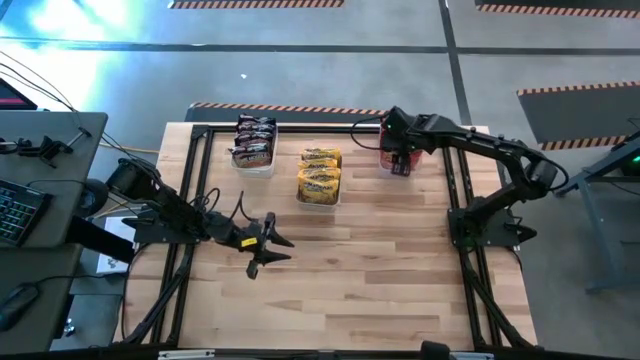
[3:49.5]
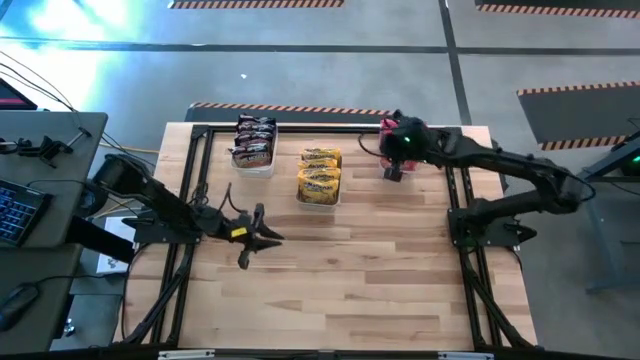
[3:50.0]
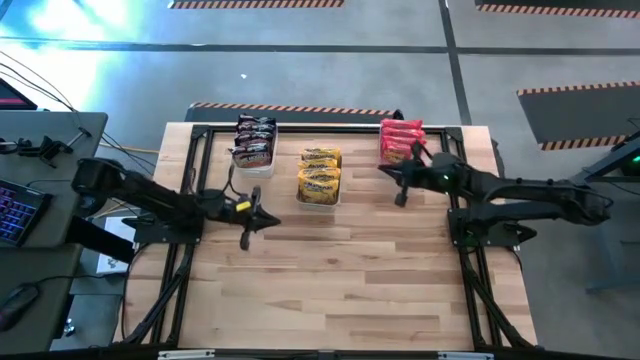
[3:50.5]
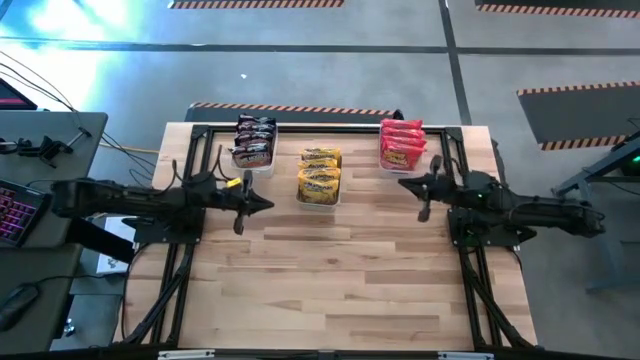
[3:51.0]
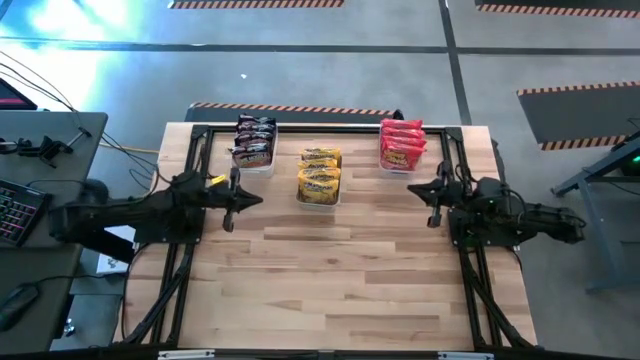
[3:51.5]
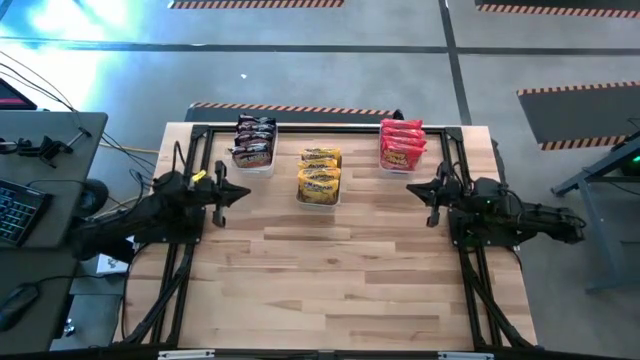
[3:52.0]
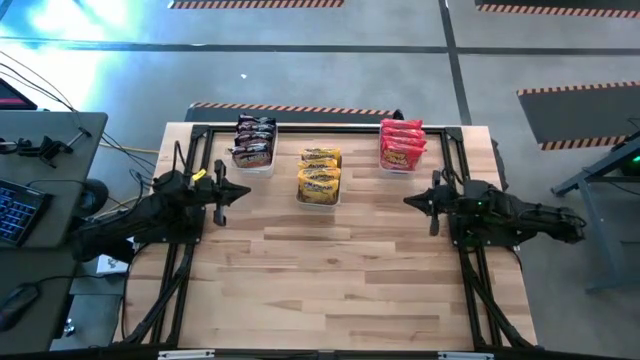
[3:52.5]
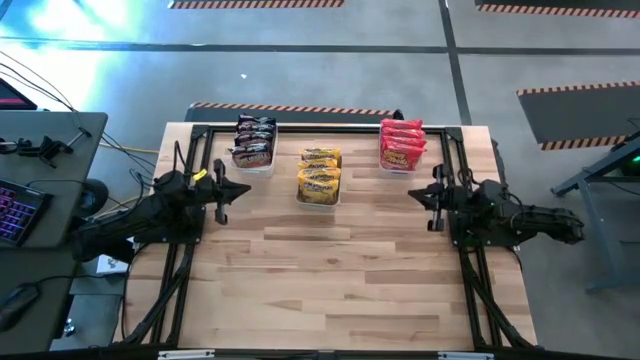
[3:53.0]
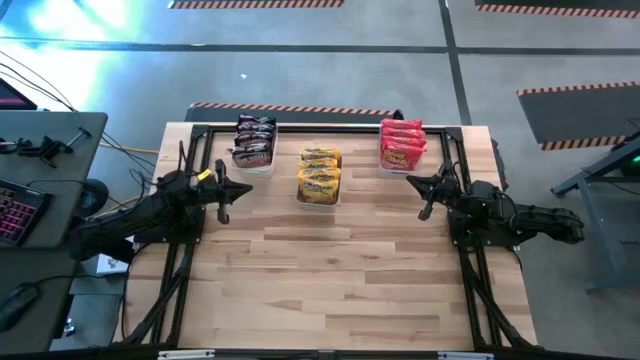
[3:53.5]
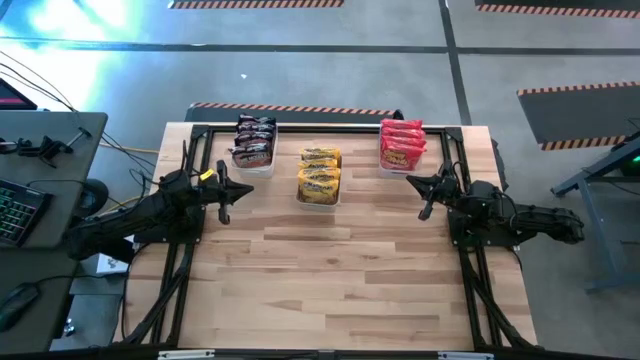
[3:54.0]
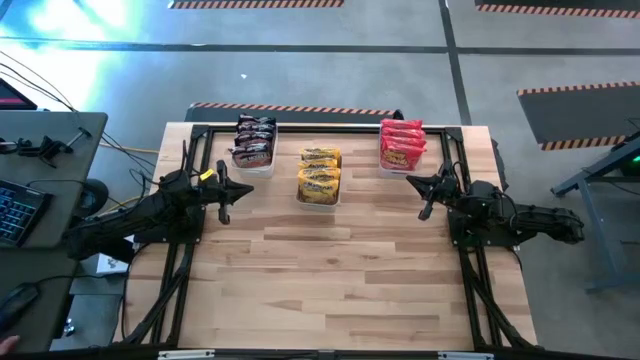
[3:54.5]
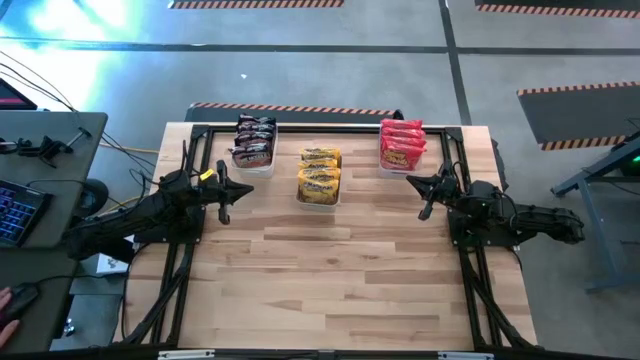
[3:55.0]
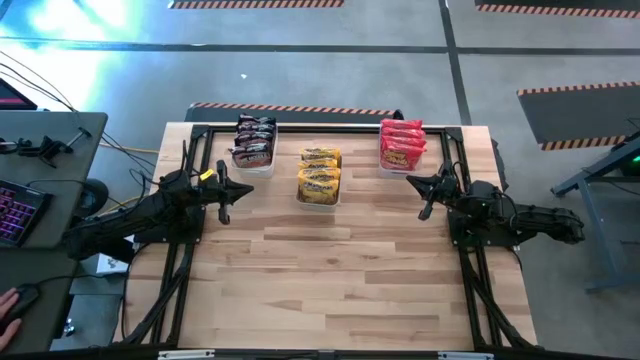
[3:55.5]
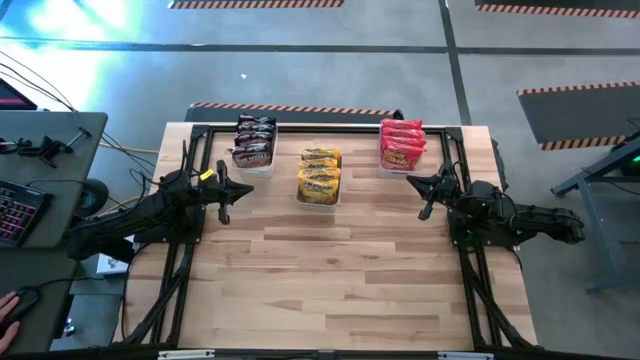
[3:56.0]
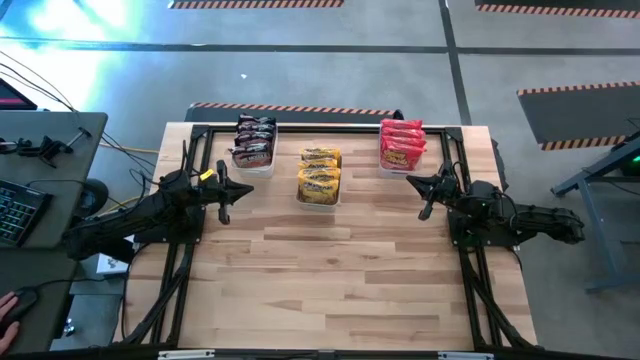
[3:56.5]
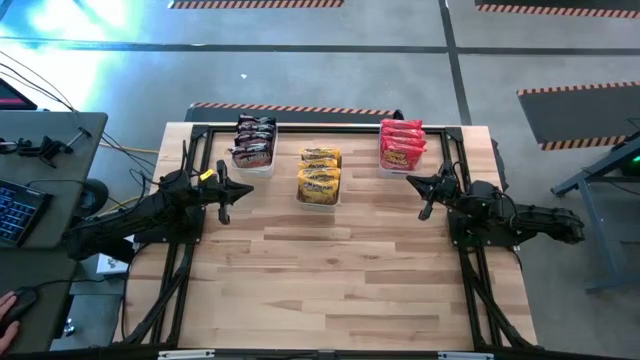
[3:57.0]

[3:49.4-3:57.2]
Task: Sort Maruchan noodles
Return to Home Position

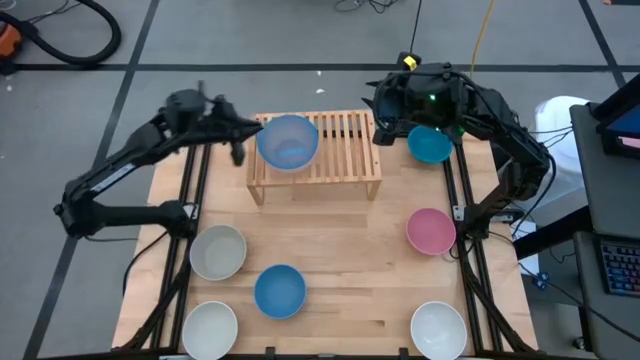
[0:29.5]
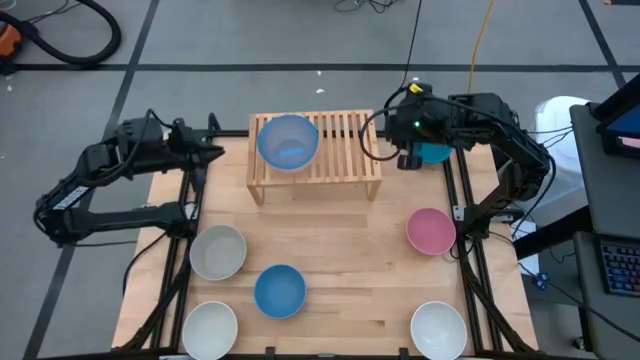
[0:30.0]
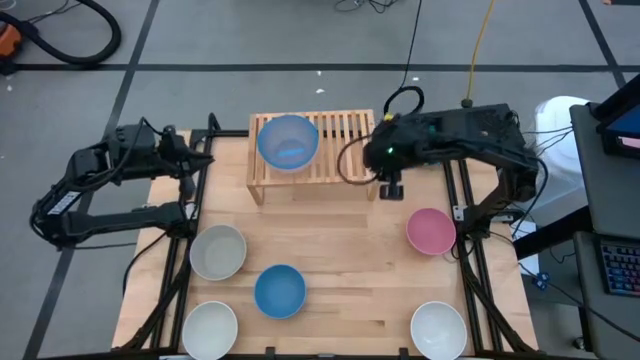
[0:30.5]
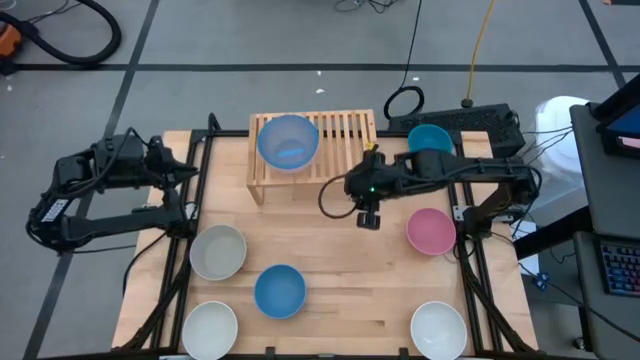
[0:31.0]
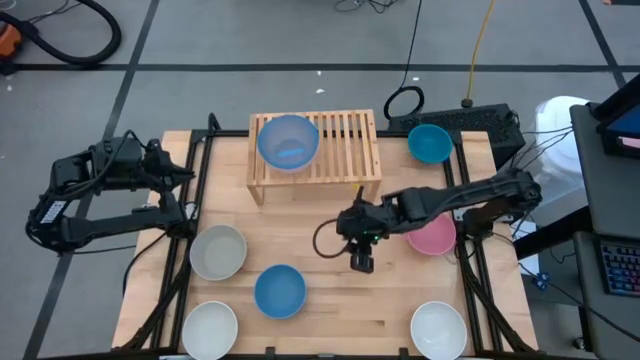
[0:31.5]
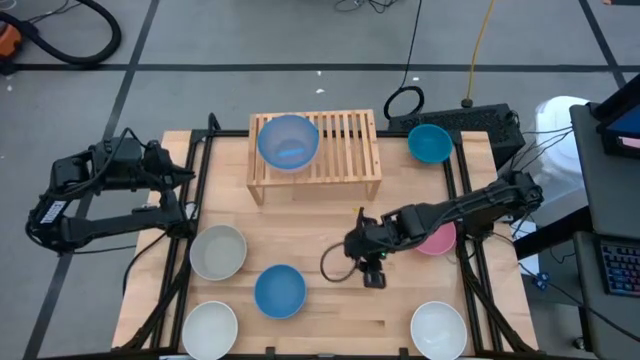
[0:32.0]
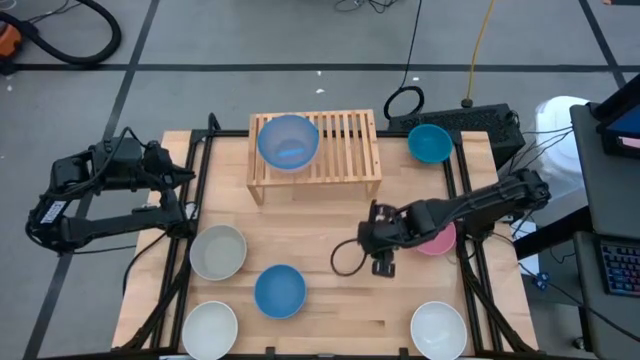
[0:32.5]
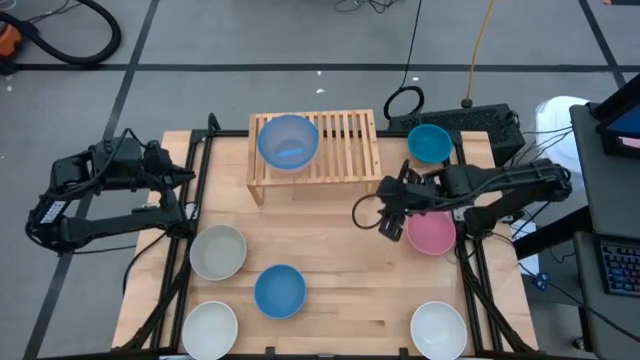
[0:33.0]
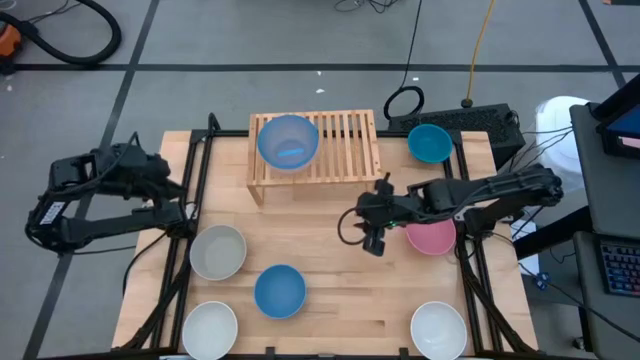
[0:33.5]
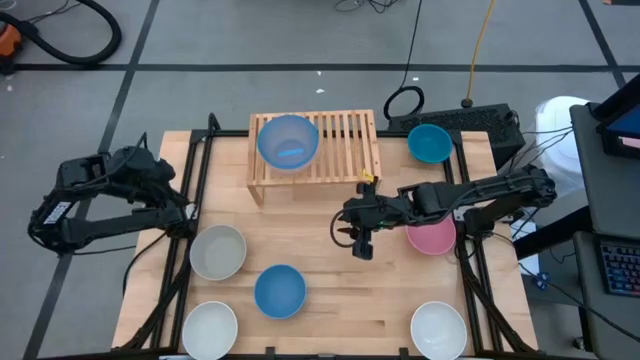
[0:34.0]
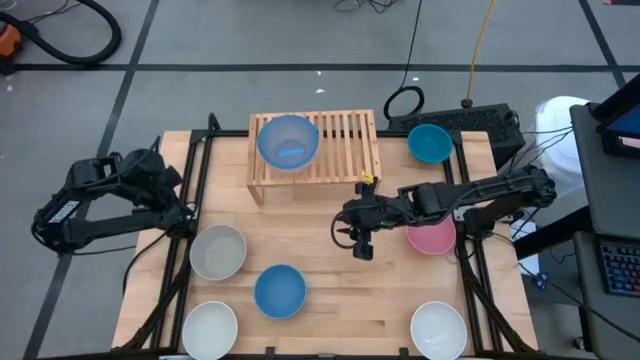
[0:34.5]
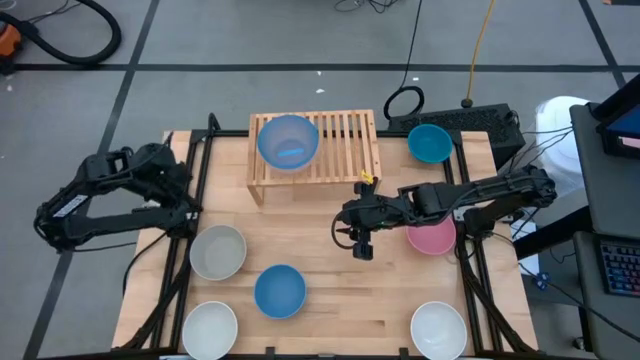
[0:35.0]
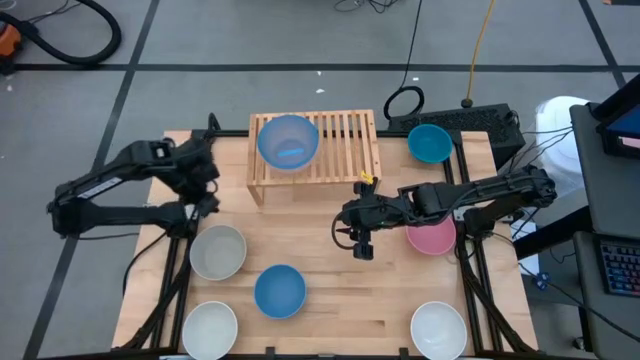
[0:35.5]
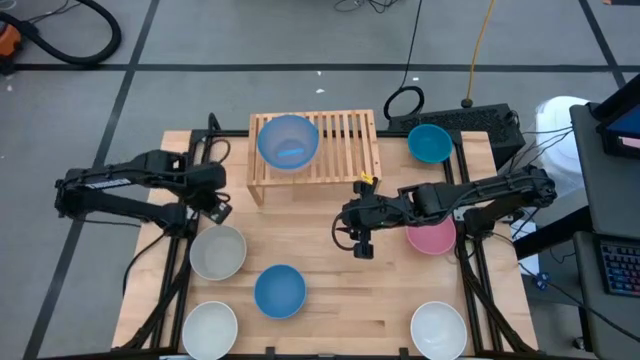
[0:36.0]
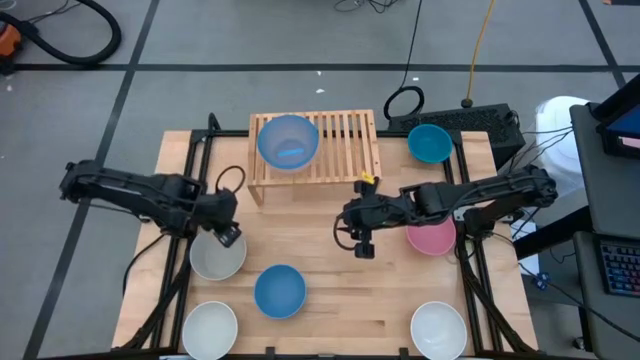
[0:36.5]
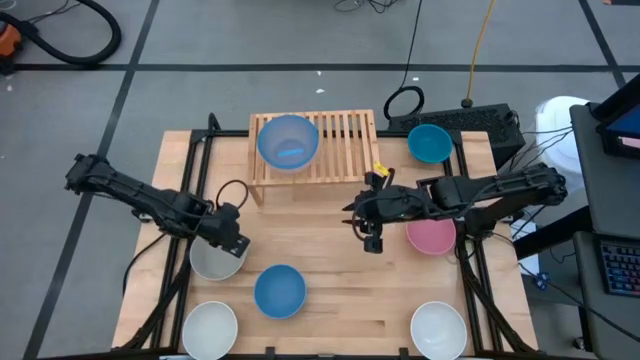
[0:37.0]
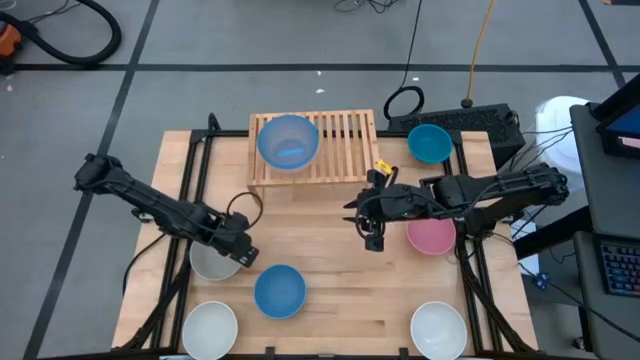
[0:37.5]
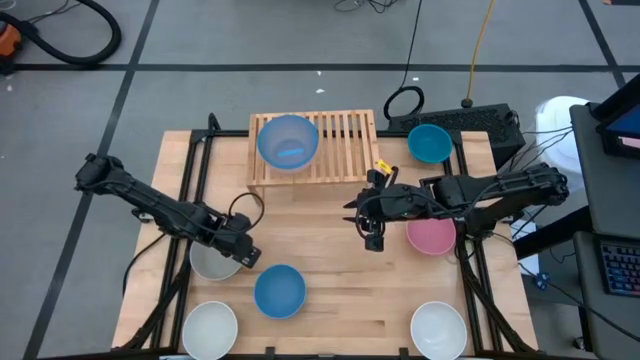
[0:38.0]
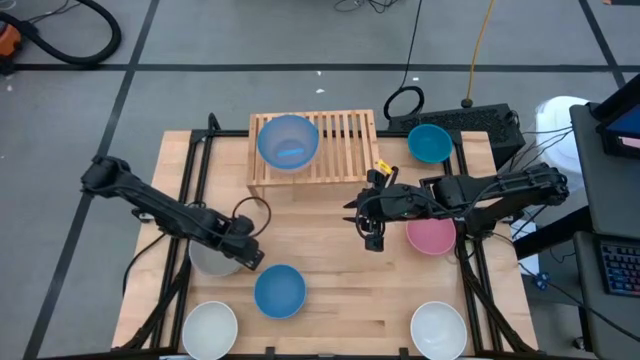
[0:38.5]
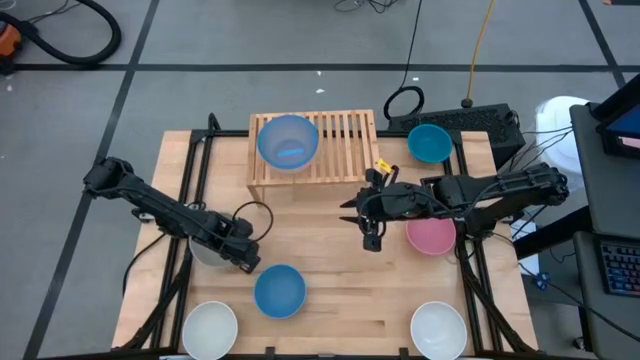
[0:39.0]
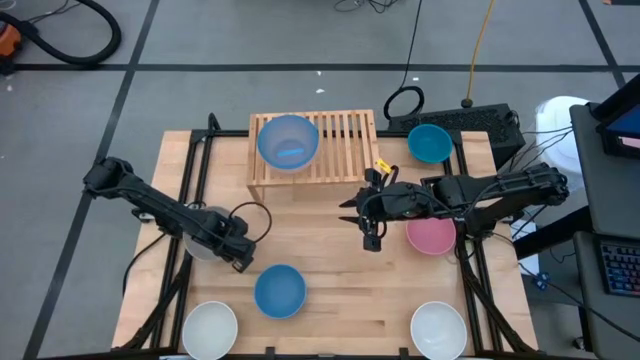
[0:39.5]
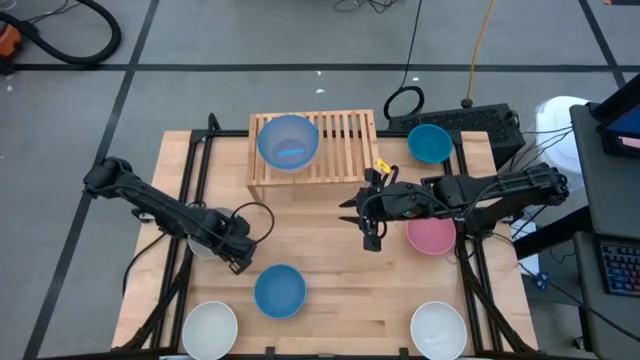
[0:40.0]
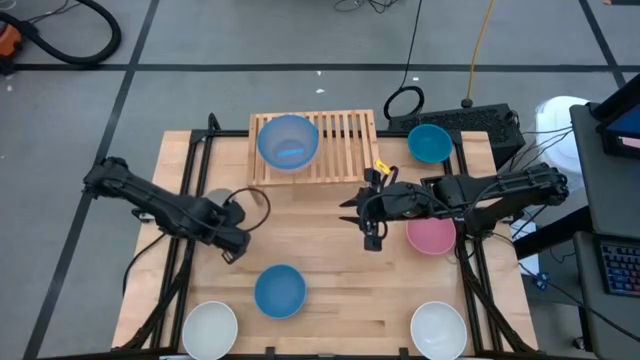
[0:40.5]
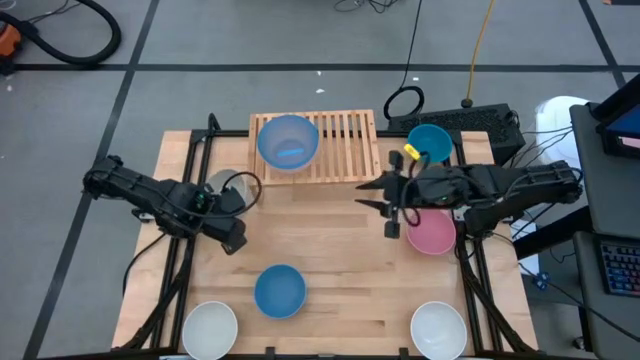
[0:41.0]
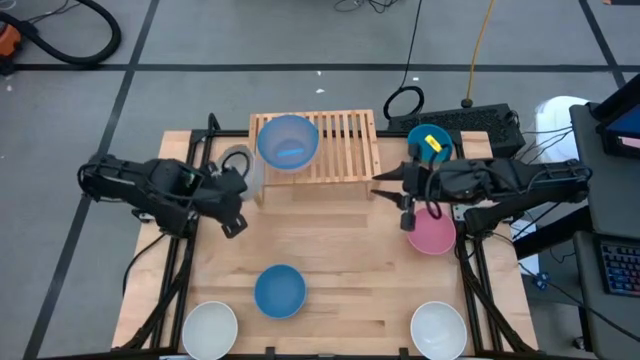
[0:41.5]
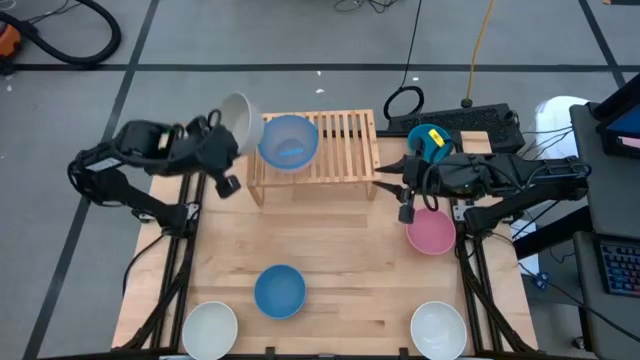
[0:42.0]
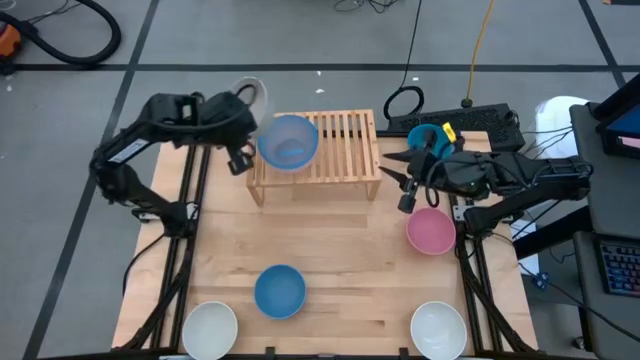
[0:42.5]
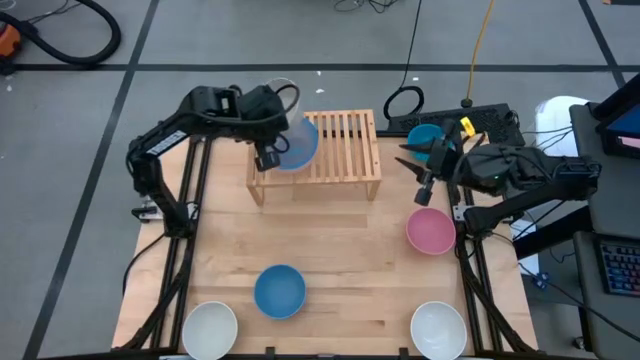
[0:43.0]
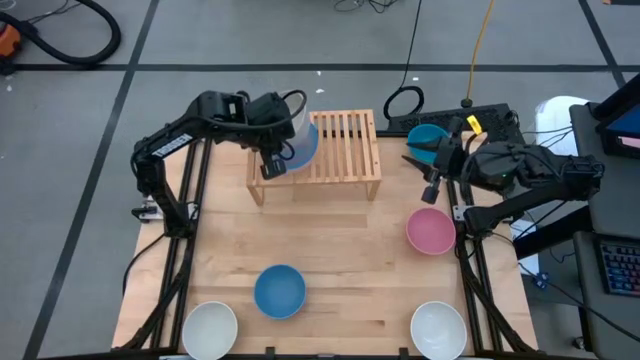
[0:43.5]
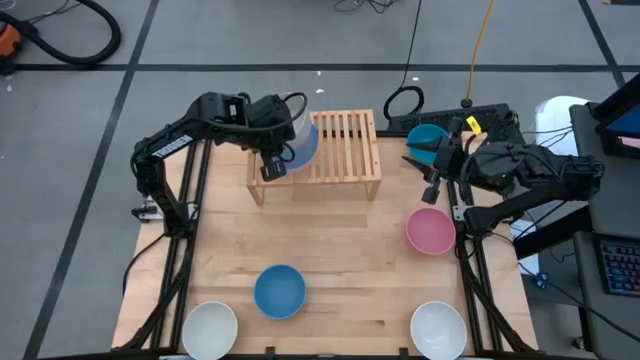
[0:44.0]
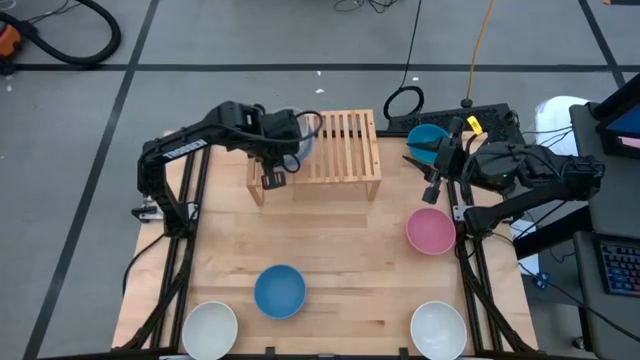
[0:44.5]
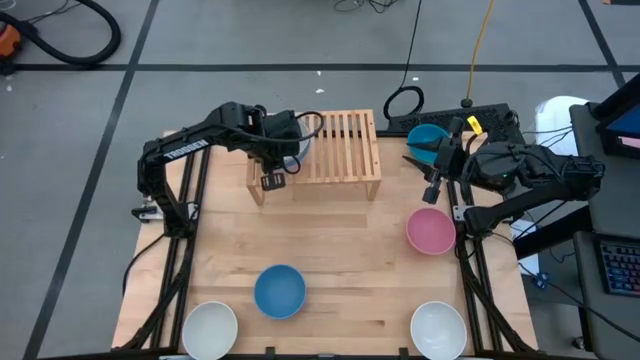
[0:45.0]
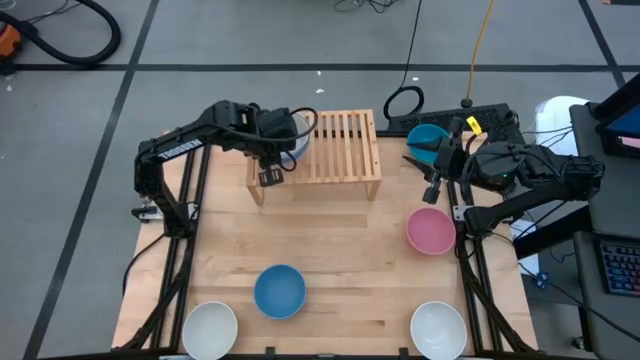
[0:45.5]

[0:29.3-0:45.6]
Task: Place and stack bowls onto a shelf
Stack the gray bowl on top of the blue bowl
